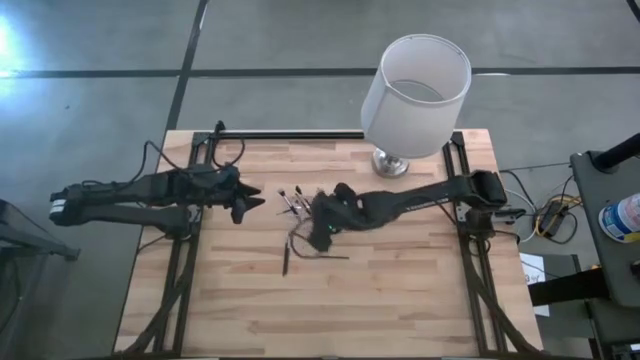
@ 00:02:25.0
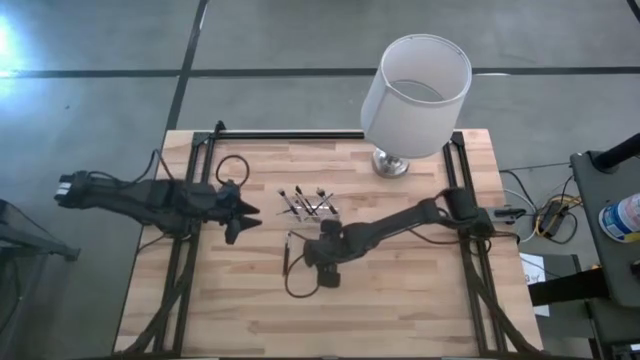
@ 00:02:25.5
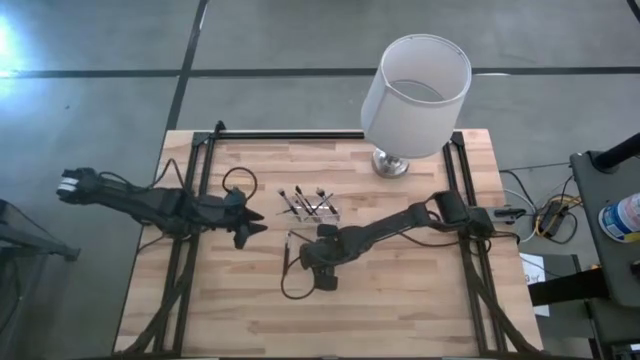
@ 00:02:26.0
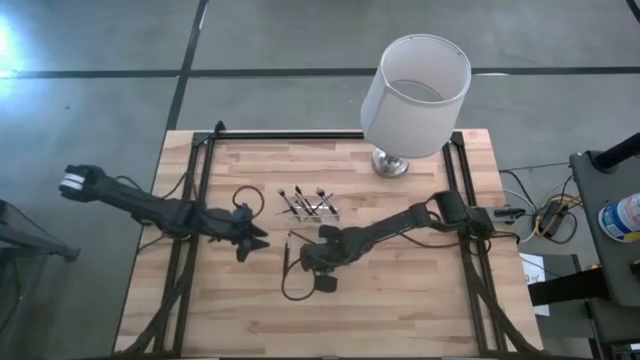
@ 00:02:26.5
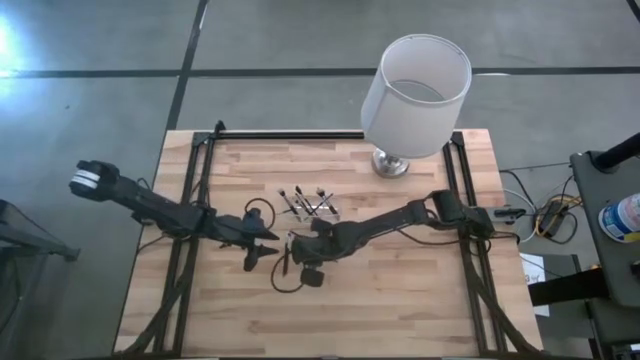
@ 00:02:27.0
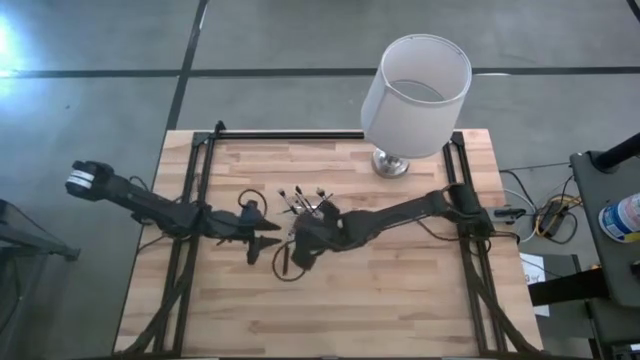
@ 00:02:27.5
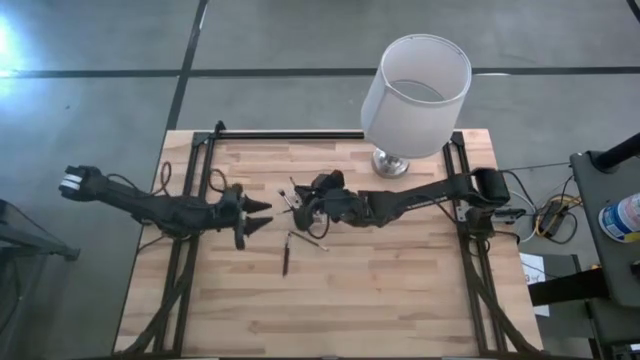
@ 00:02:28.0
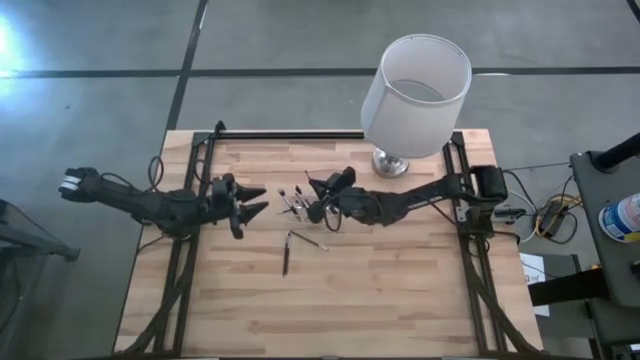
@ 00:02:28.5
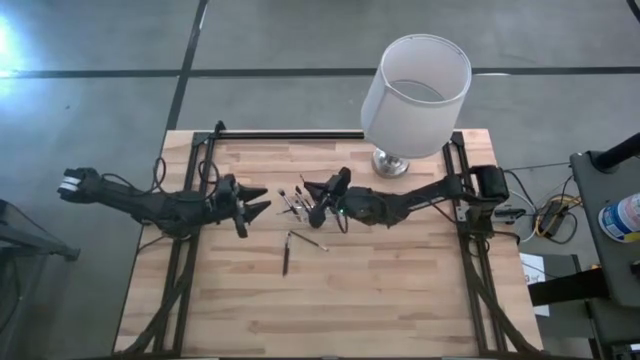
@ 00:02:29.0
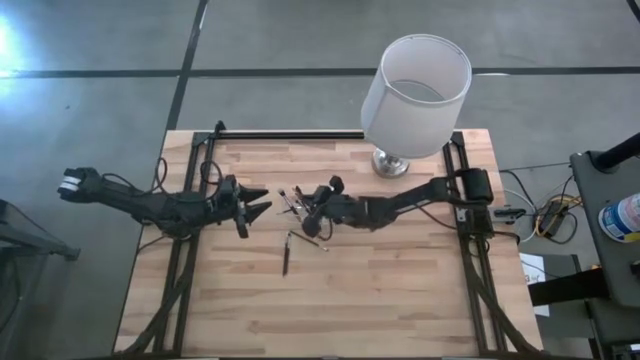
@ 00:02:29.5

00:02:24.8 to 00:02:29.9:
Task: Put items in baskets/containers
Put the eyeshadow brush into the transparent organizer

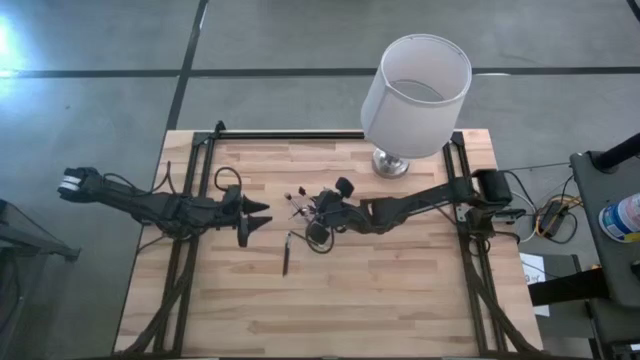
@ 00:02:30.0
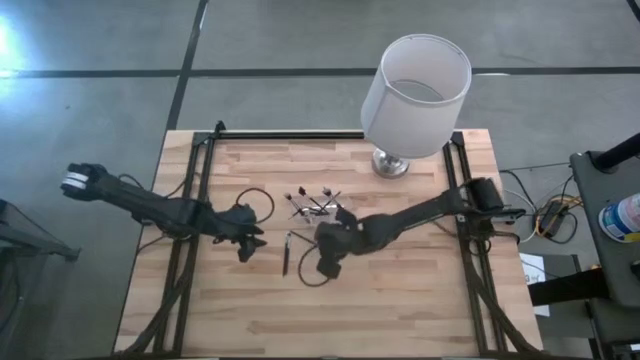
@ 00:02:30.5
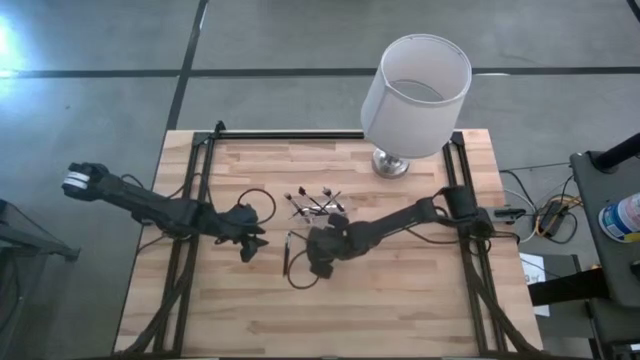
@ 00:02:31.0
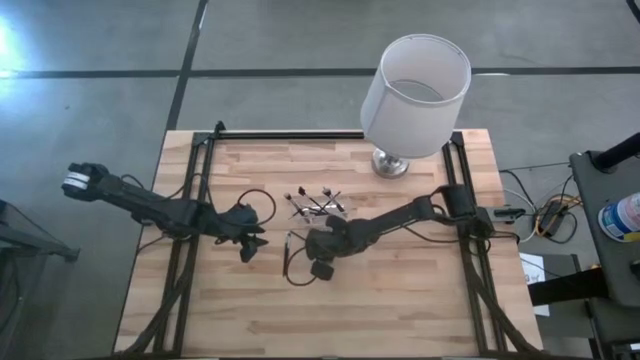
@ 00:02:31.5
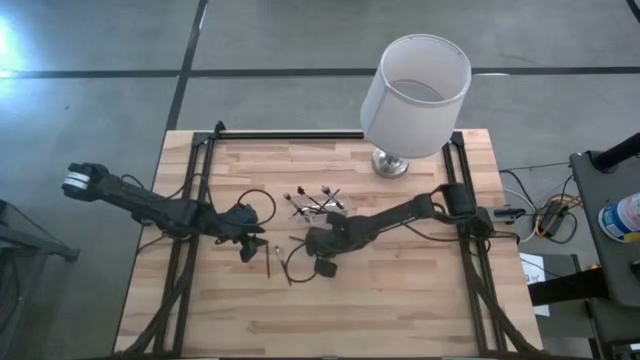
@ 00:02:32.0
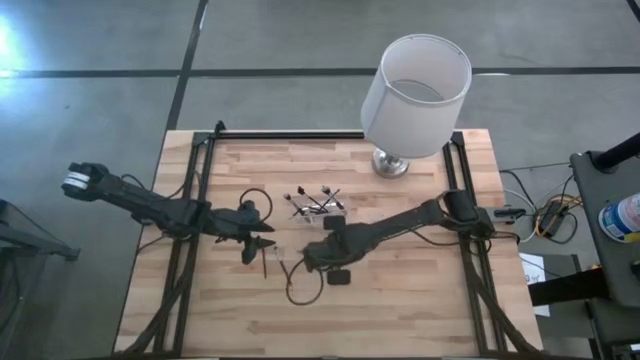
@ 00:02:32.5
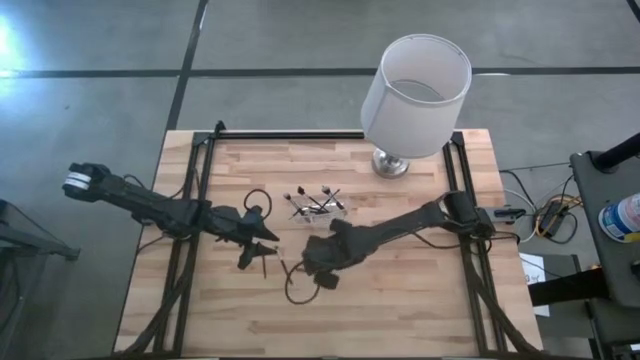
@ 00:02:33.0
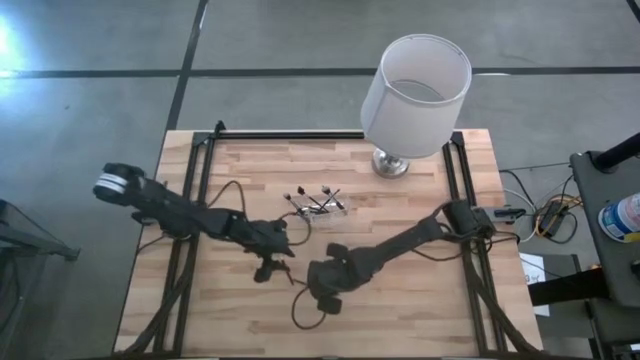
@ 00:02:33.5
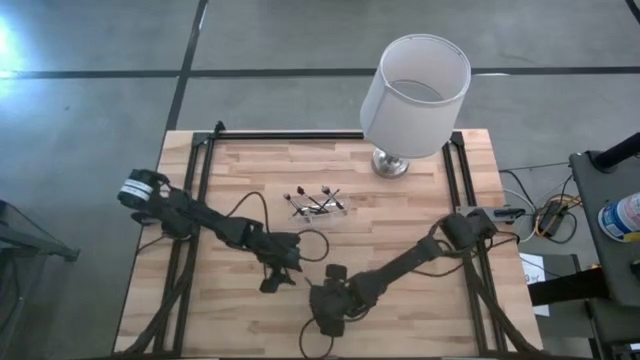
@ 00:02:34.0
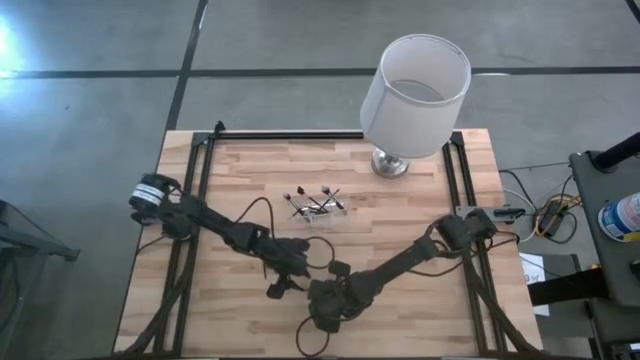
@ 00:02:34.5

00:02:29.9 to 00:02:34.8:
Put the eyeshadow brush into the transparent organizer

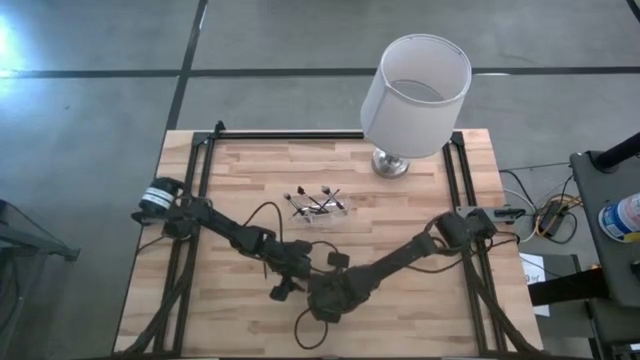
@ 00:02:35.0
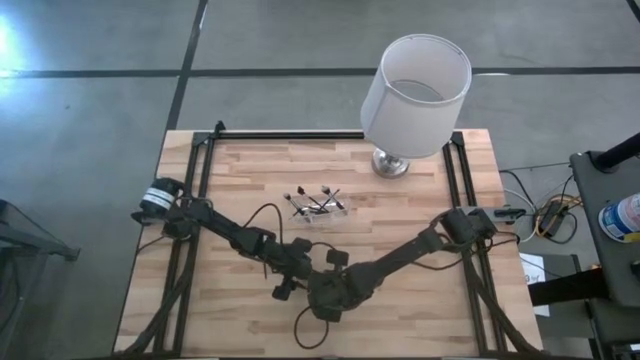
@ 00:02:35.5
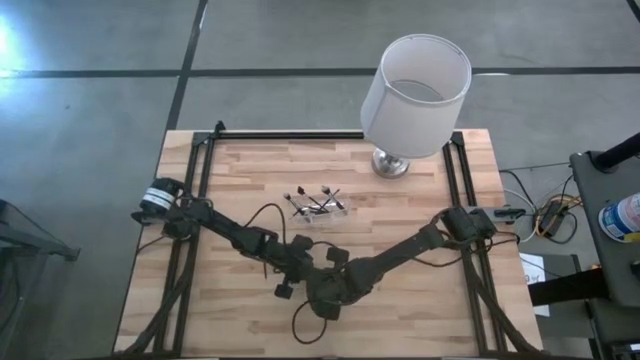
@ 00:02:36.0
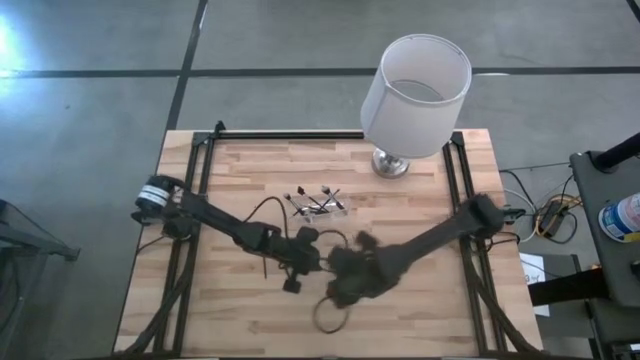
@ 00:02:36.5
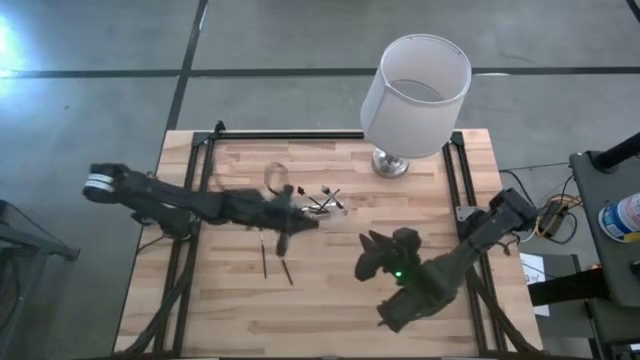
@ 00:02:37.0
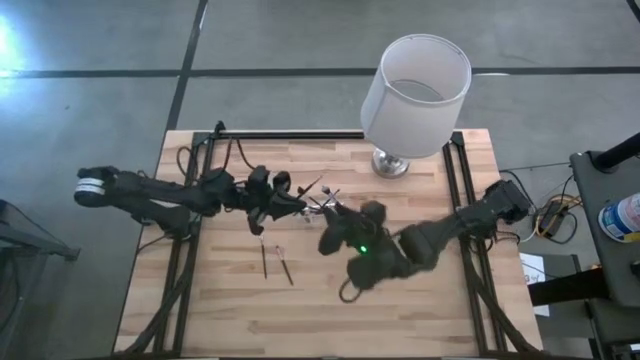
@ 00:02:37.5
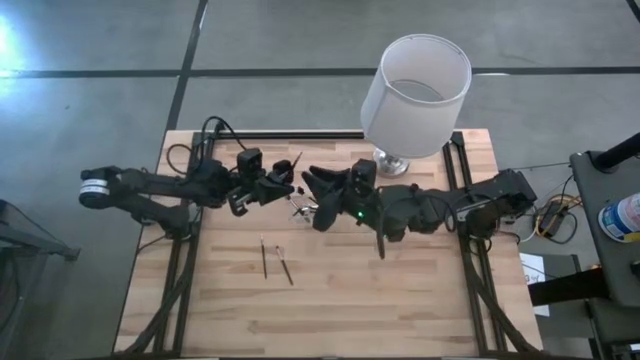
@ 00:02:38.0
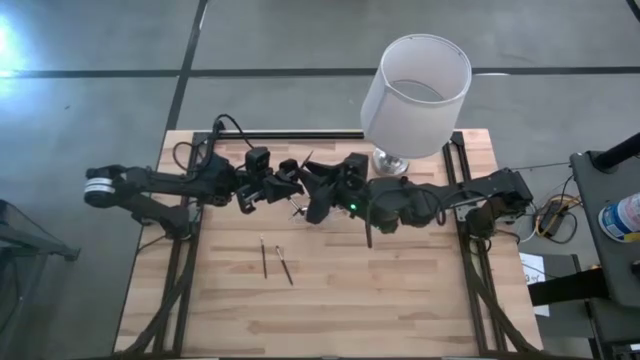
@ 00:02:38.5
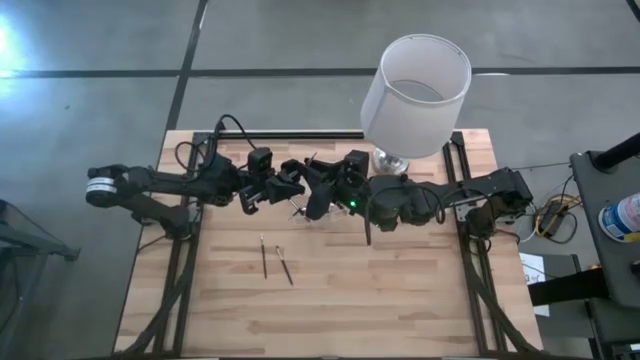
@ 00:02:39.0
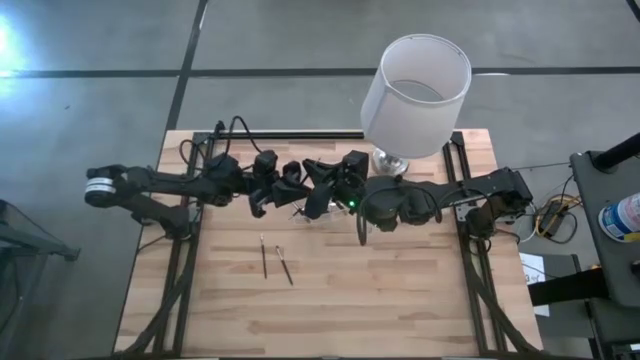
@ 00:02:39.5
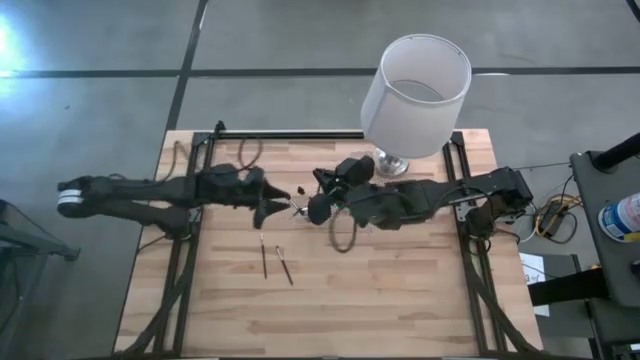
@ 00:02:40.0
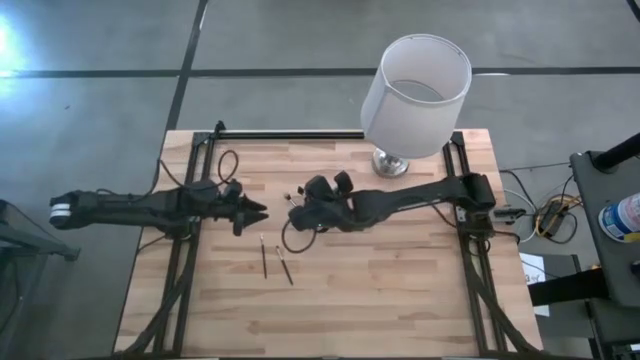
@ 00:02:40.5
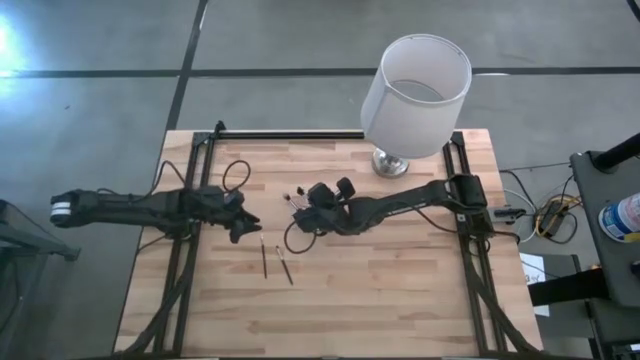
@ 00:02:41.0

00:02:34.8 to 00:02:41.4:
Put the eyeshadow brush into the transparent organizer

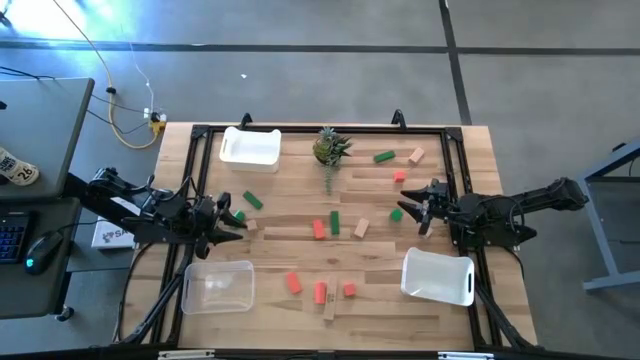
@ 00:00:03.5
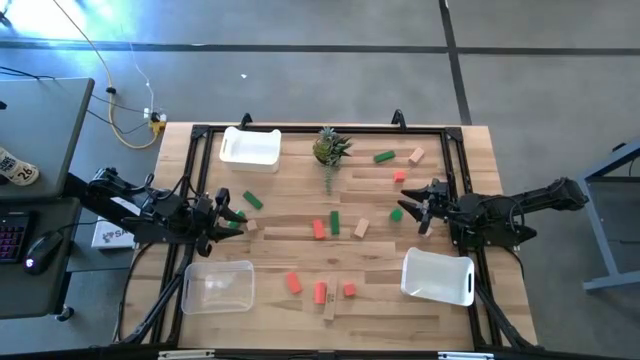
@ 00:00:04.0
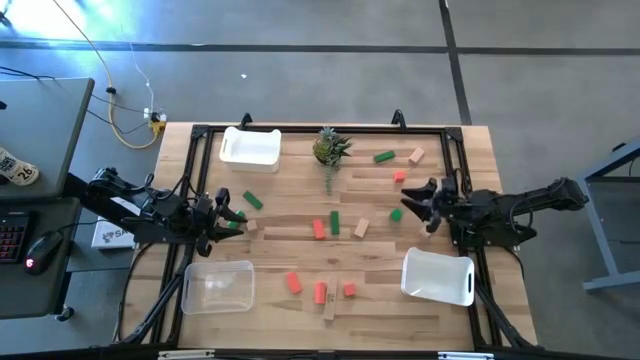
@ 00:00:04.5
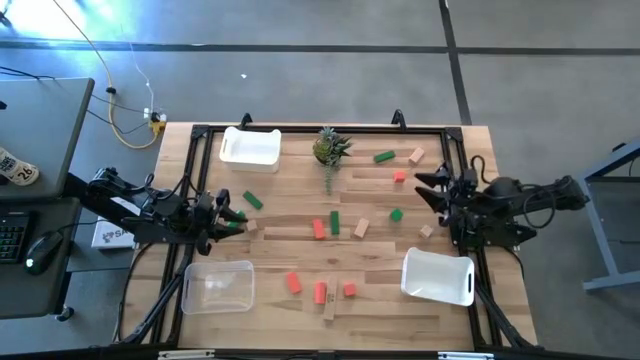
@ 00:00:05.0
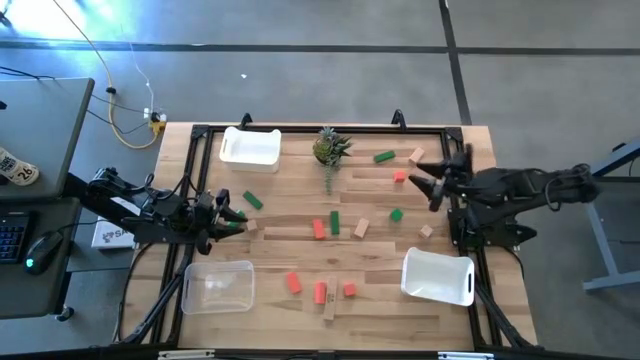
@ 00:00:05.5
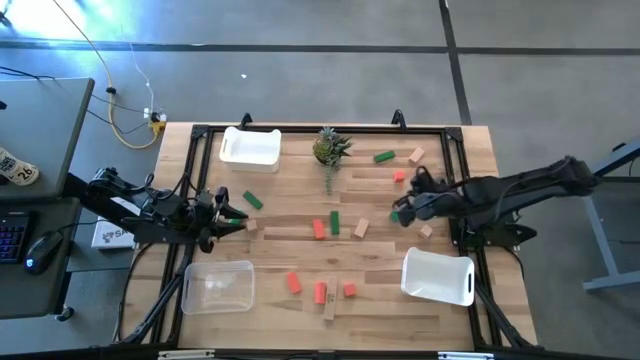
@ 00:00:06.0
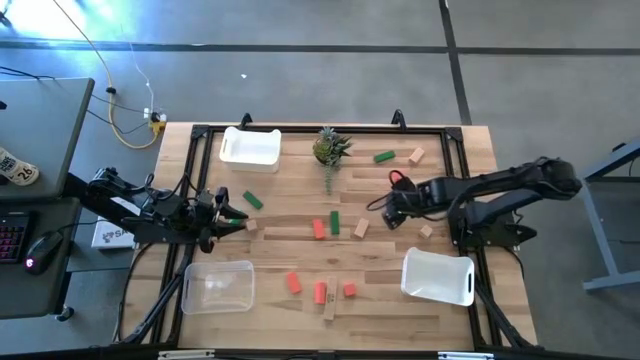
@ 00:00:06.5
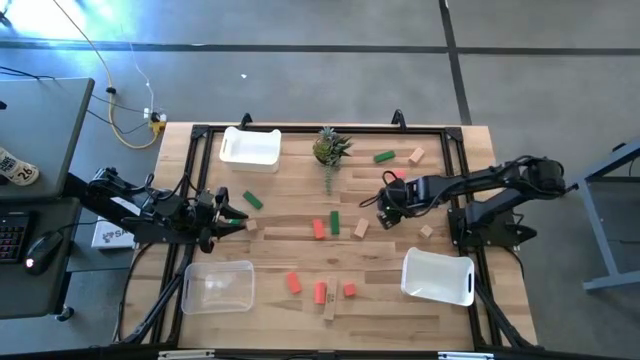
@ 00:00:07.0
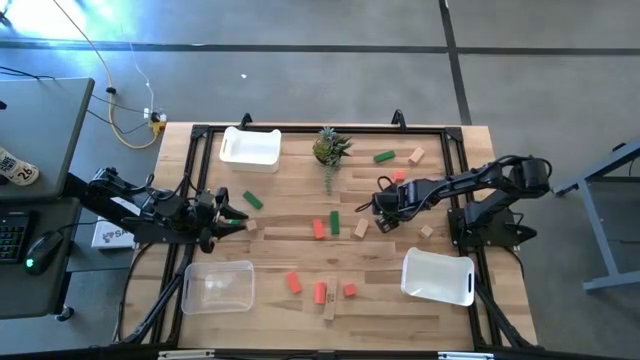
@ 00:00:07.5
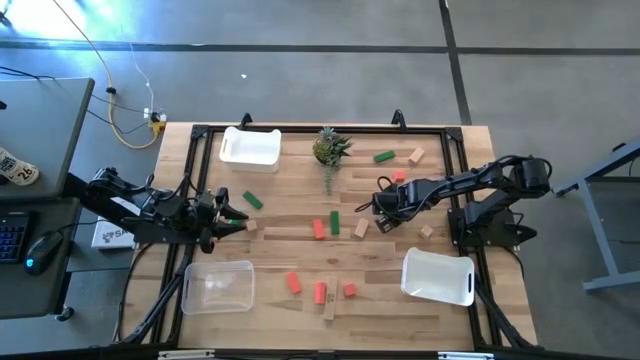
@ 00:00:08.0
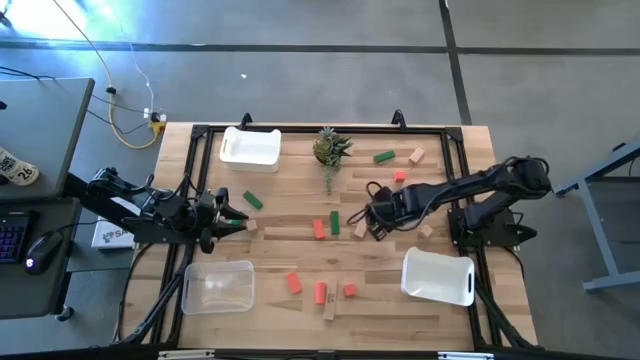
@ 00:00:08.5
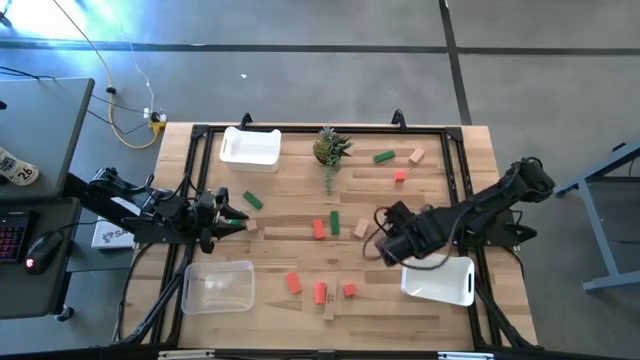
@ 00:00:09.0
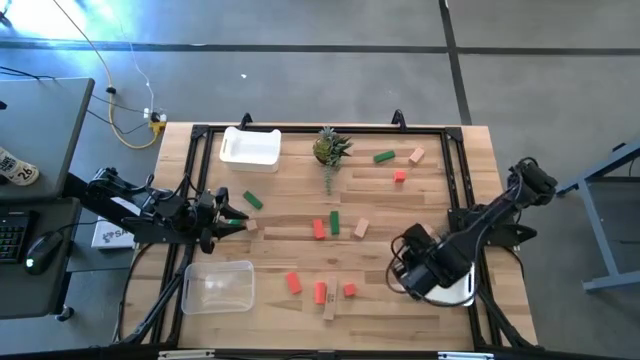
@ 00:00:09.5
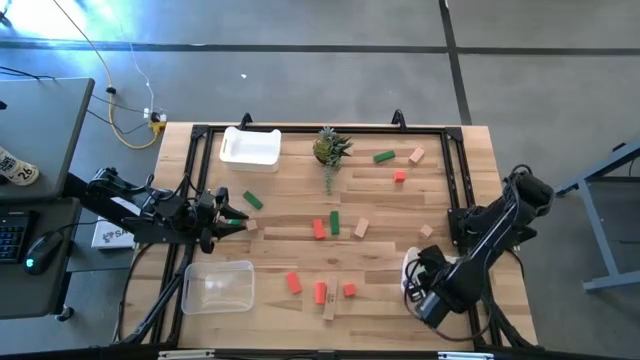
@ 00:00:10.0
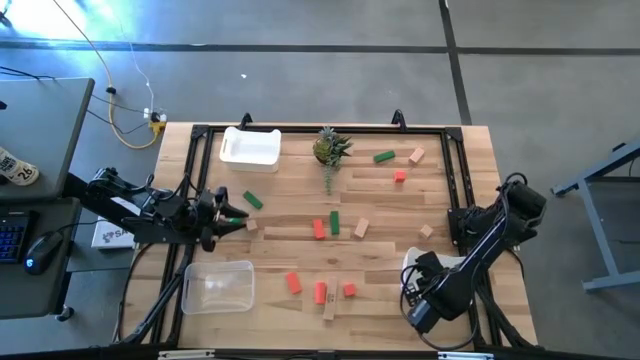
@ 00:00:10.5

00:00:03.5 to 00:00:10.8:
Task: Sort & place blocks by color
Put the green block into the bottom white bin
